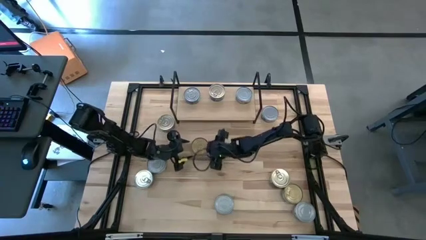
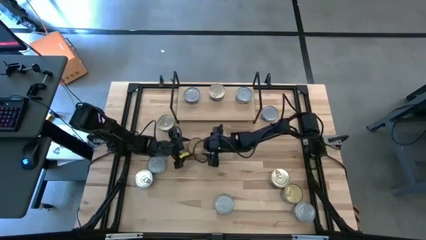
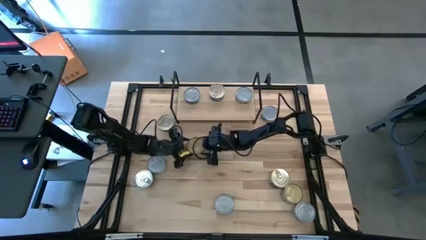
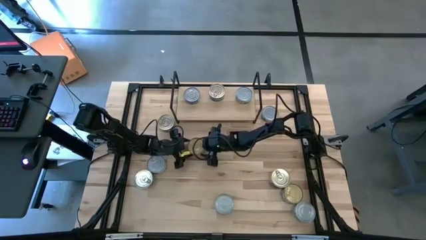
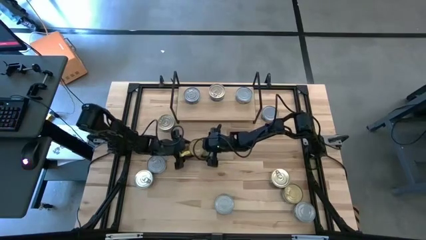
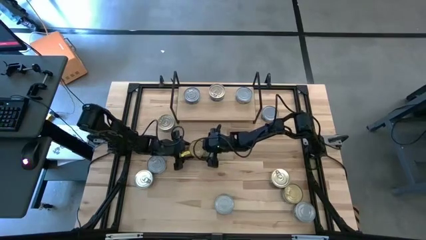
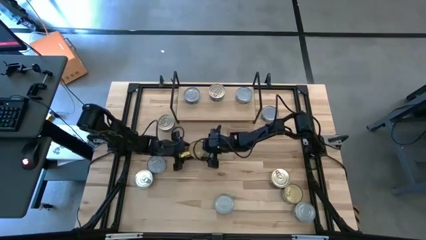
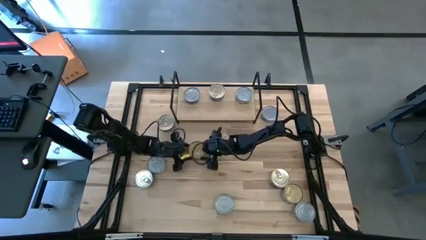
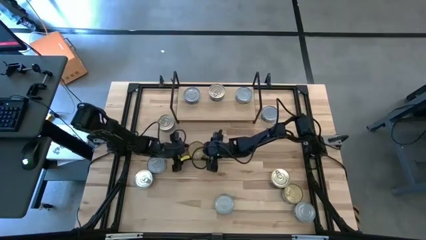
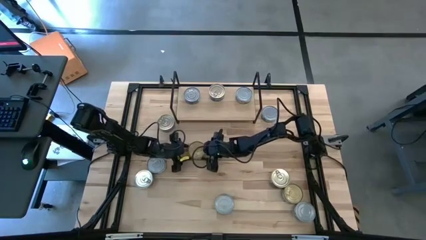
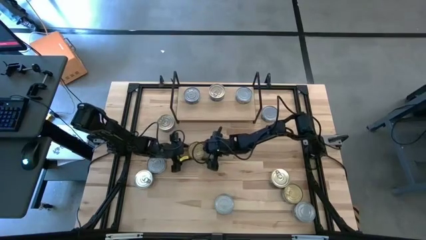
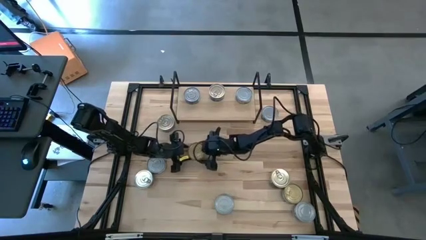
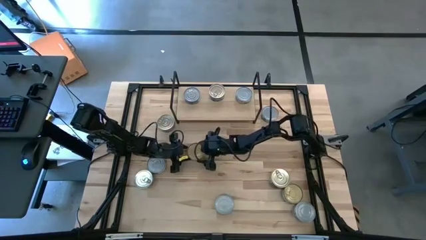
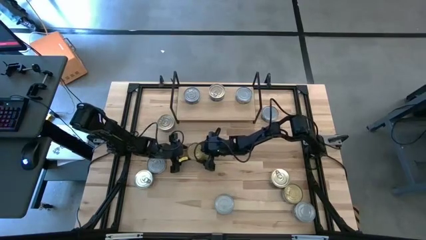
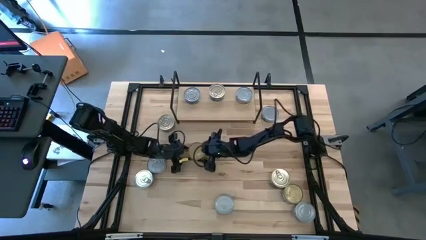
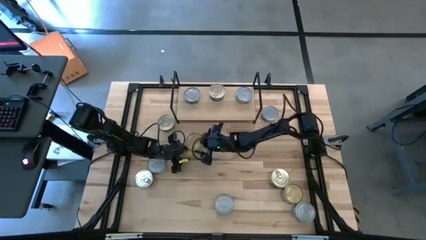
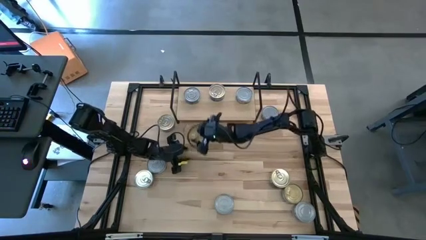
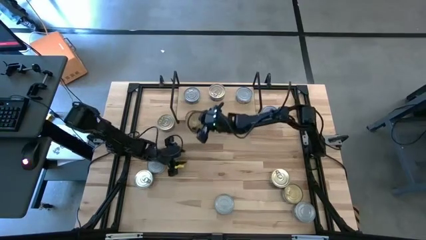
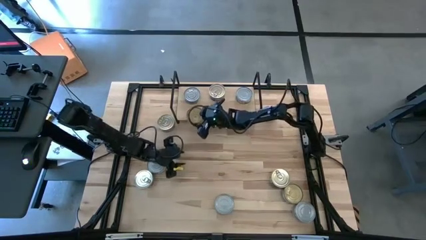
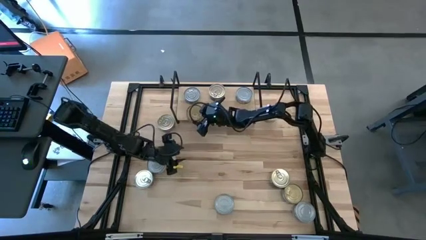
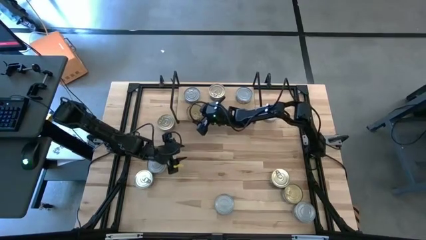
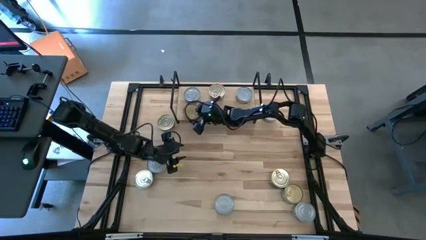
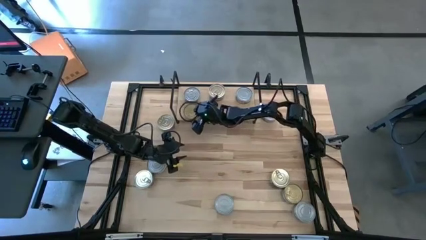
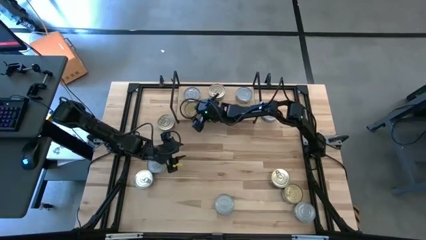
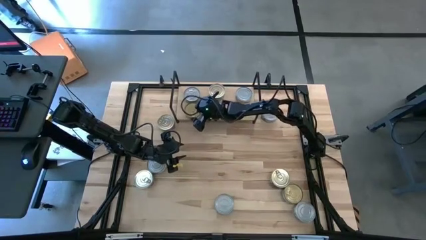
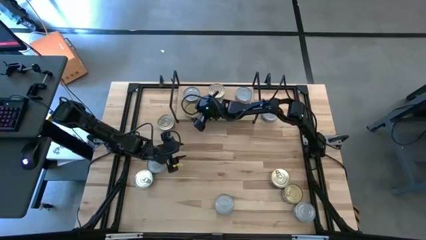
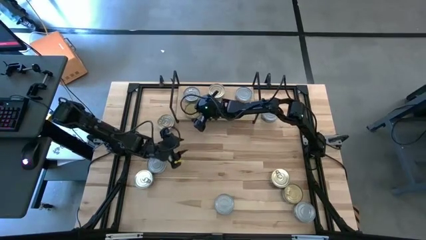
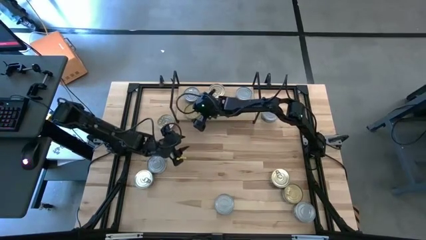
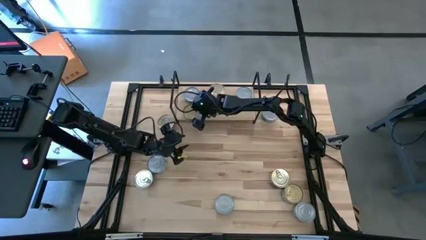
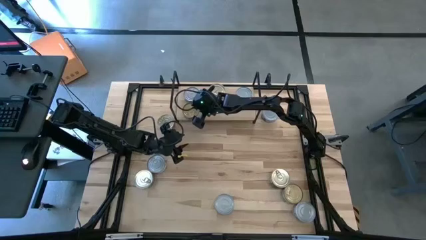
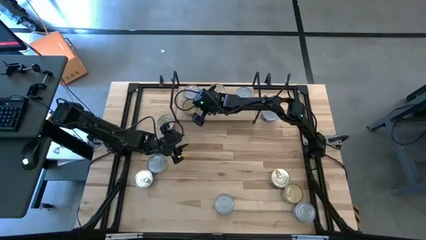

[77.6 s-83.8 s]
Task: Stack canned seafood by type on shelf
Put the top right green and blue tuna can on the shelf aligned with the other green and blue tuna can

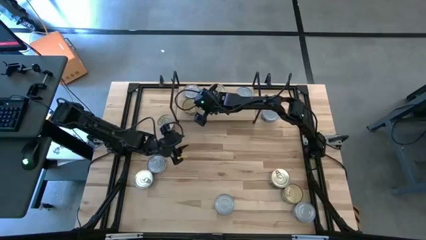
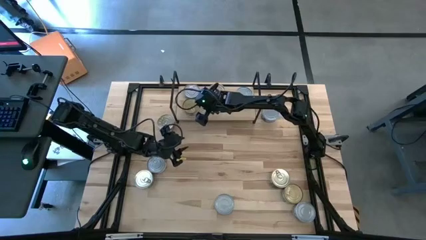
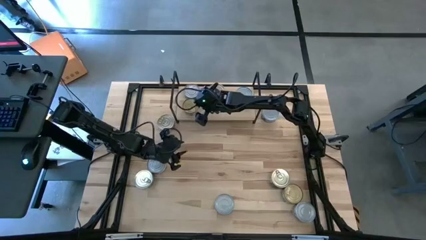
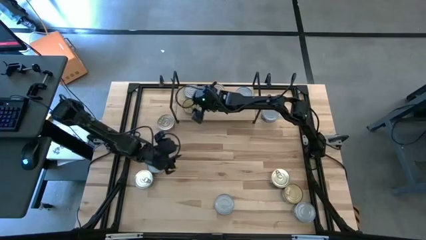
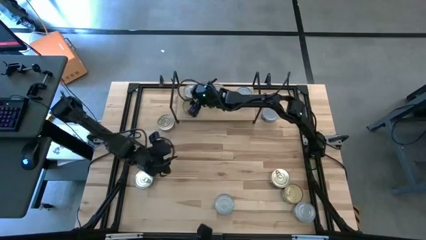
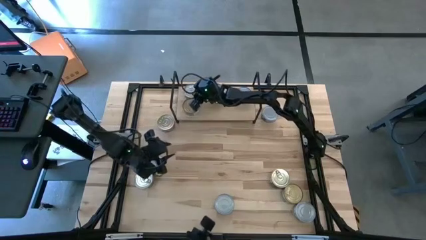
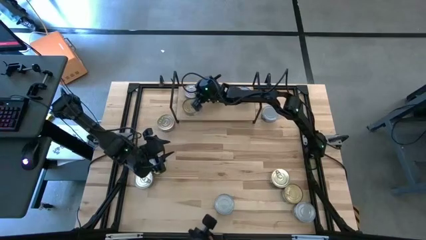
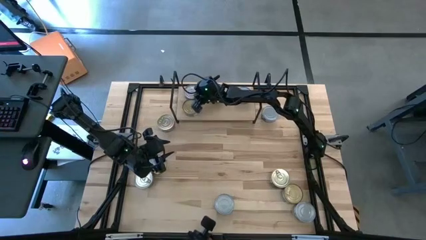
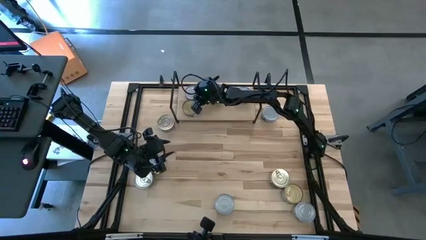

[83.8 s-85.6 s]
Adjust the green and blue tuna can on the shelf

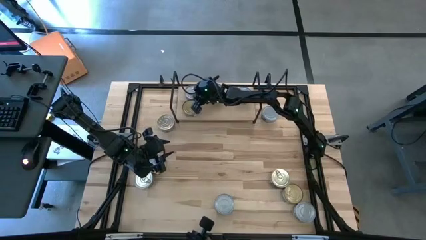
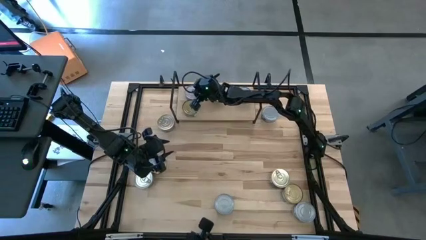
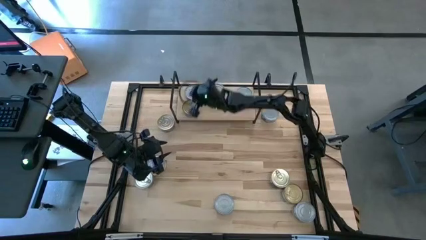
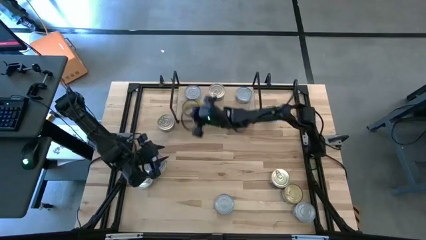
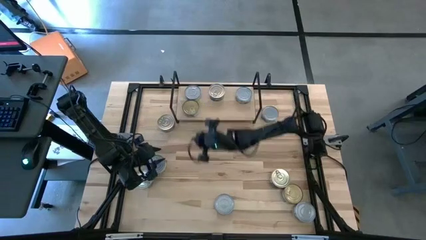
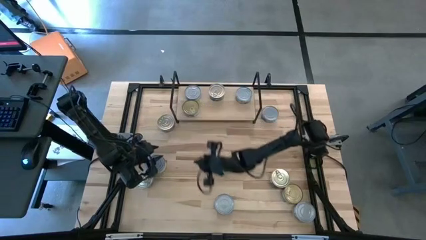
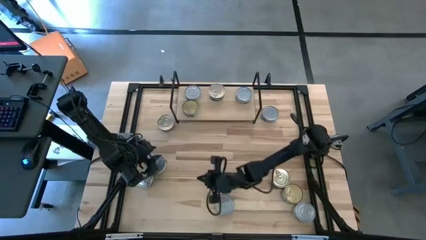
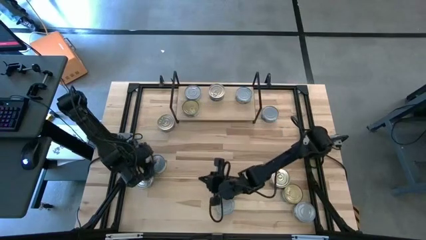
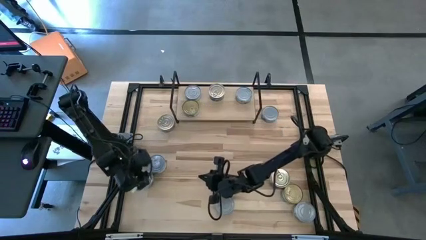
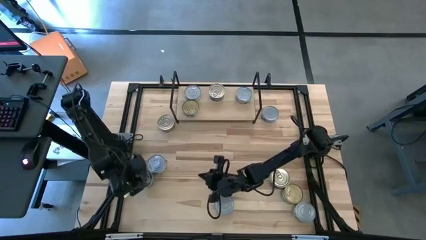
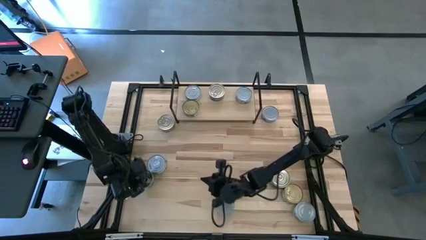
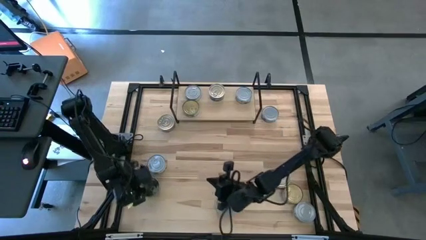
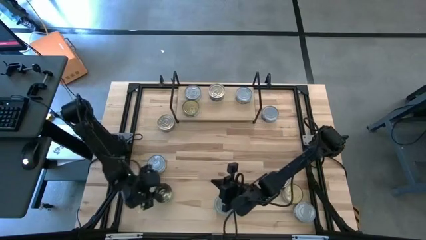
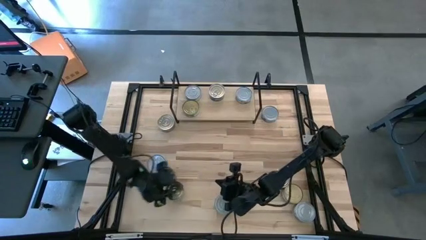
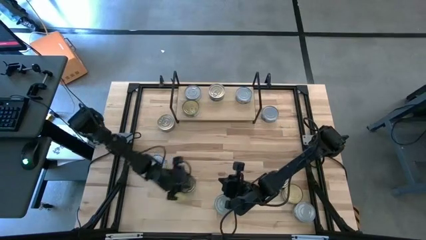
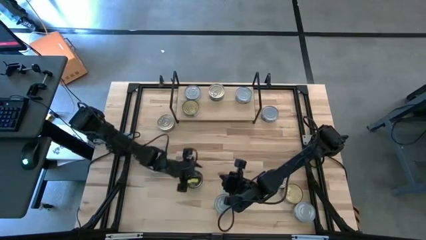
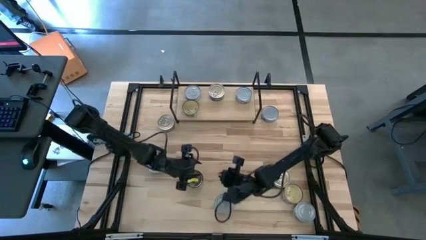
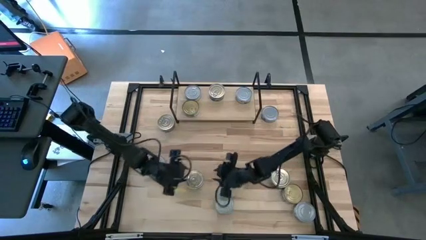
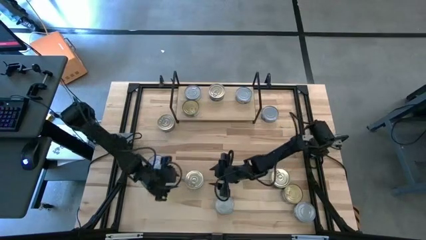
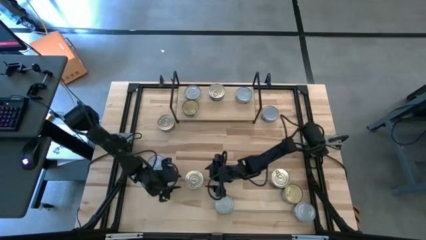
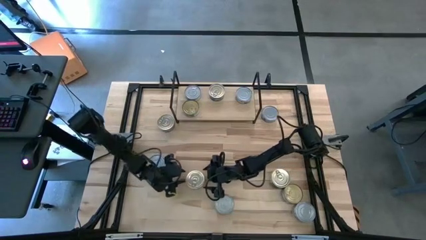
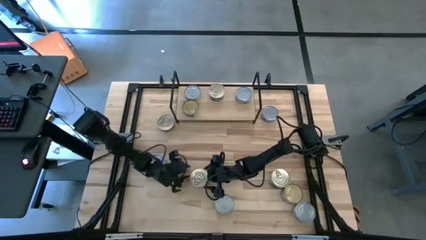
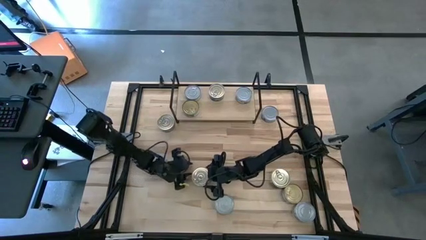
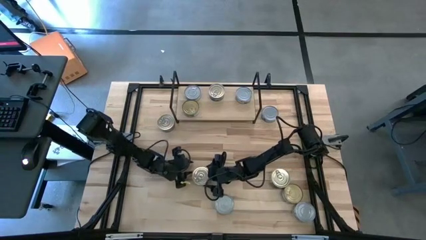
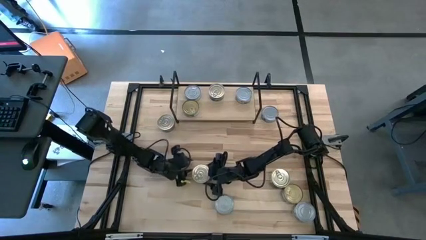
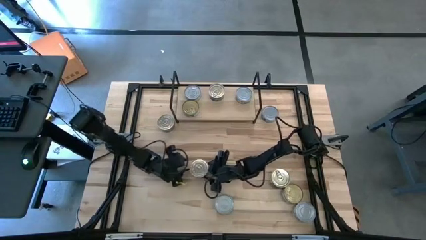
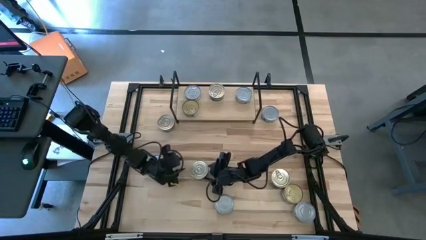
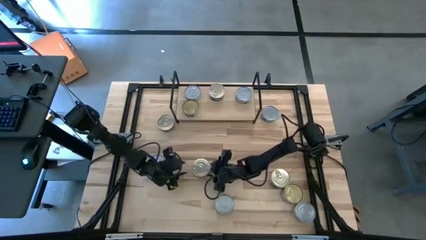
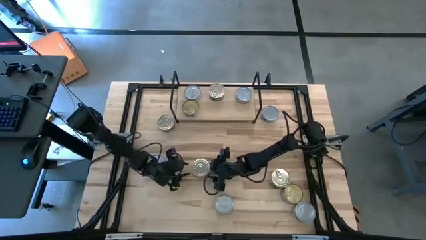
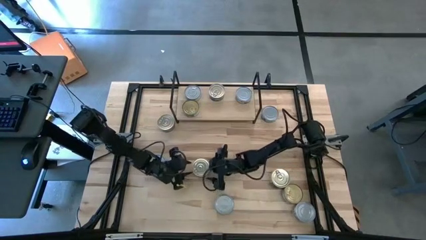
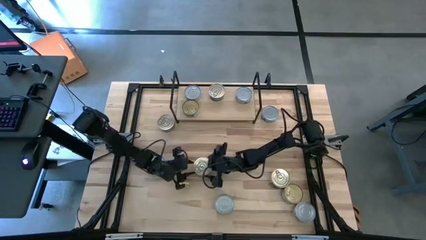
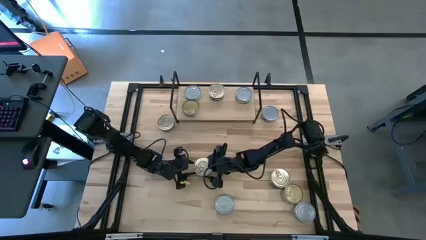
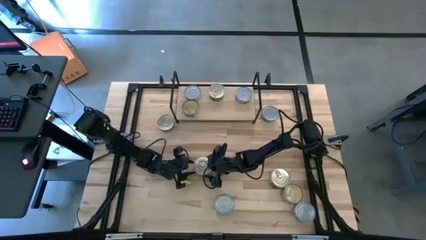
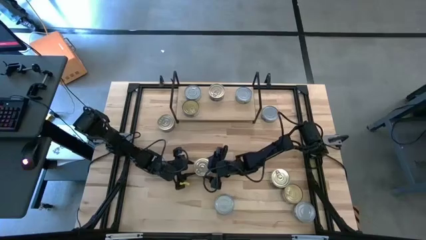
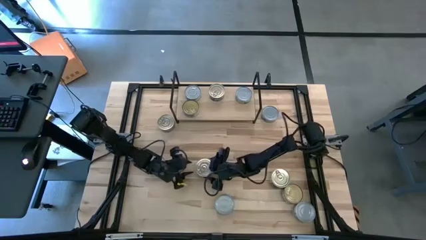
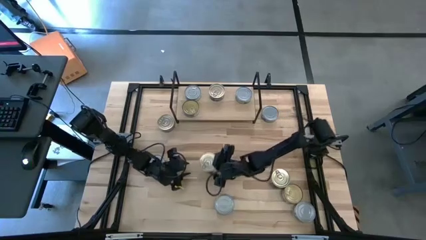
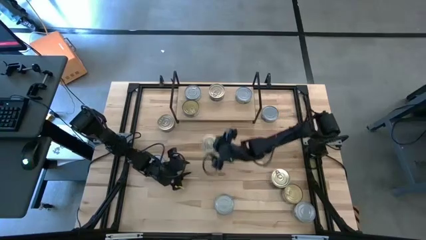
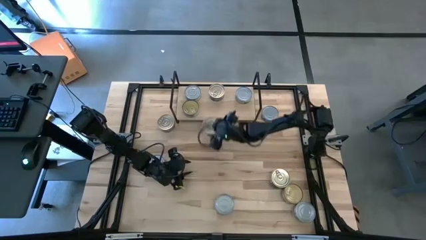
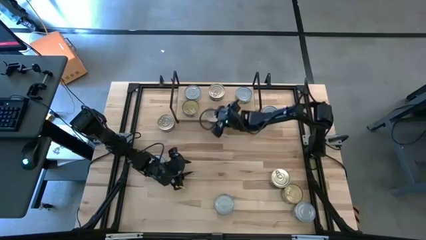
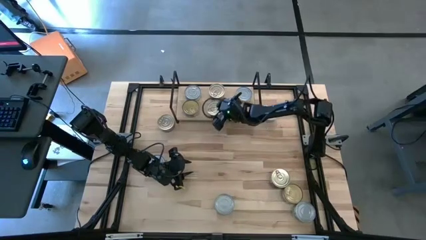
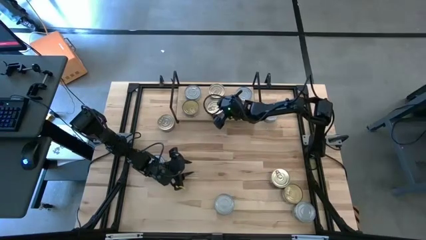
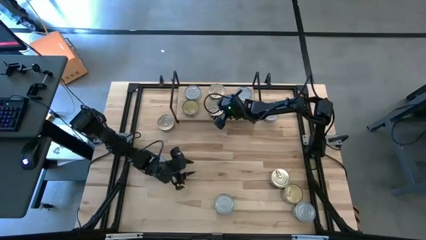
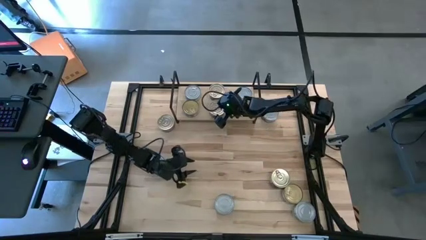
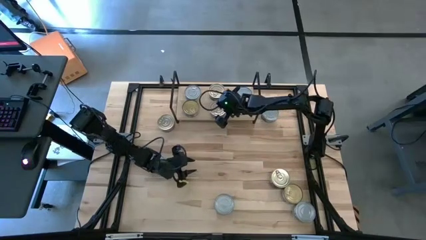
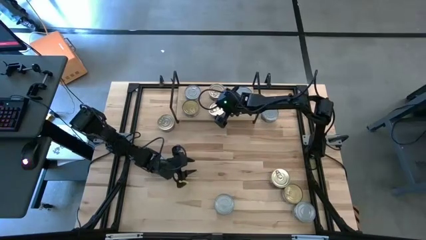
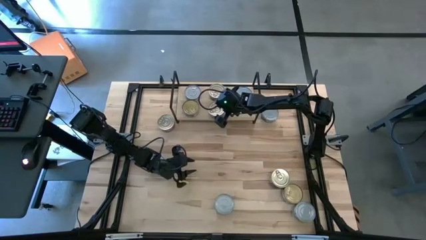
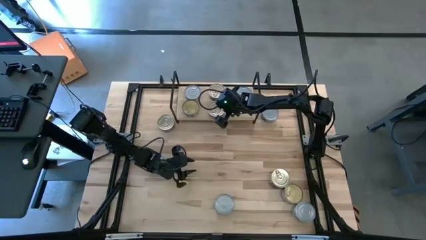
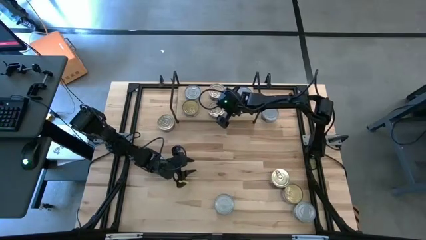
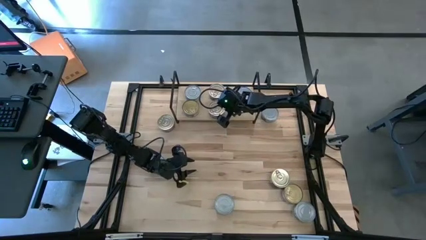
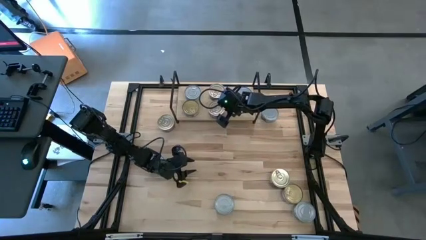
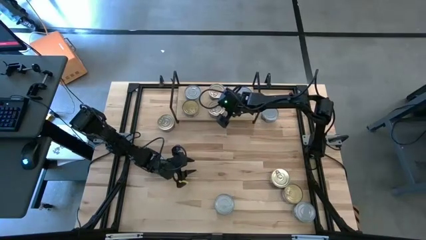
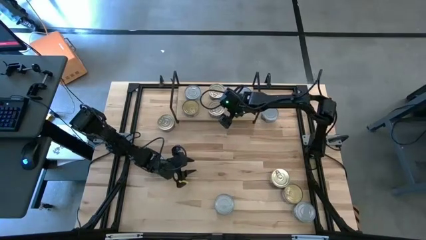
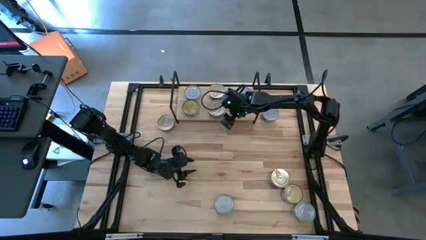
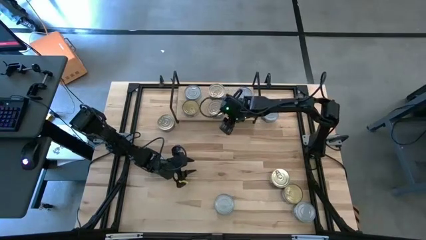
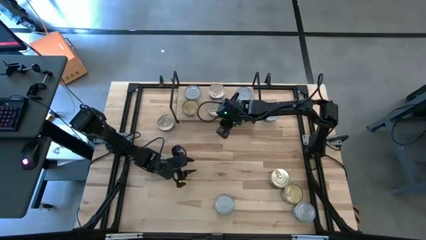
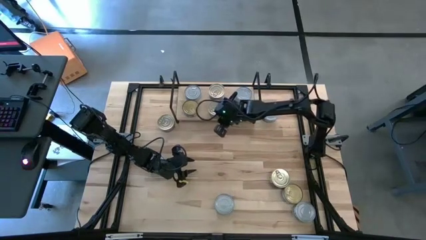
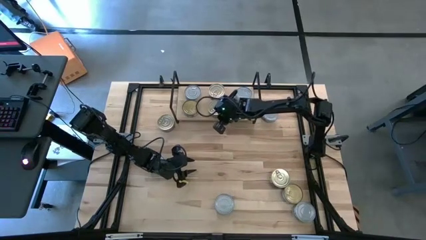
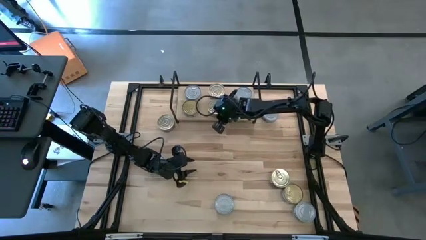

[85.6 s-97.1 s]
Put the bottom left blue tuna can on the shelf aligned with the other blue tuna can
